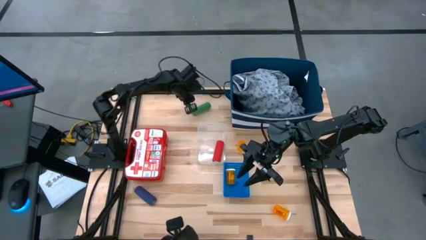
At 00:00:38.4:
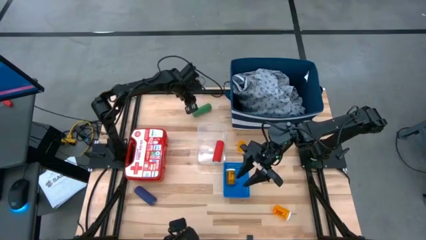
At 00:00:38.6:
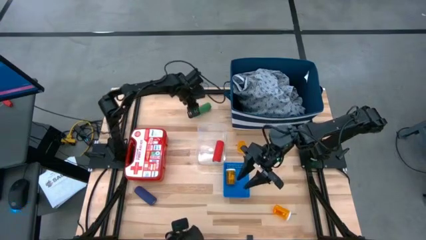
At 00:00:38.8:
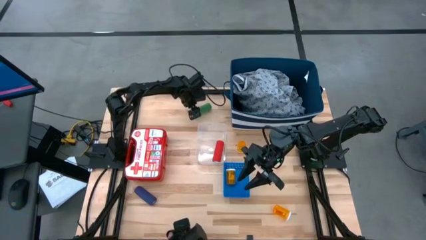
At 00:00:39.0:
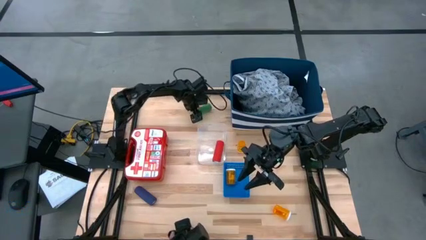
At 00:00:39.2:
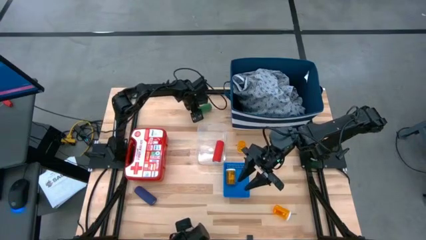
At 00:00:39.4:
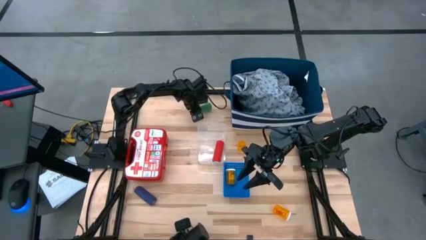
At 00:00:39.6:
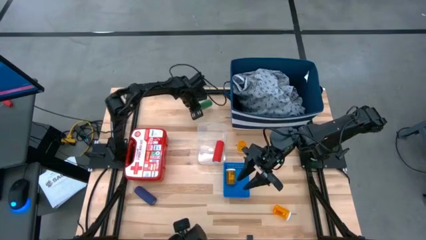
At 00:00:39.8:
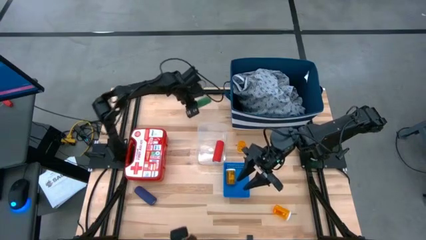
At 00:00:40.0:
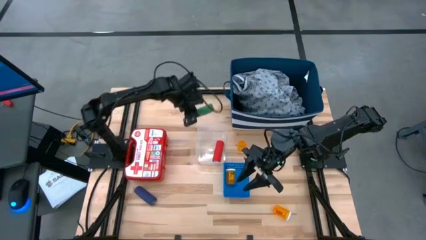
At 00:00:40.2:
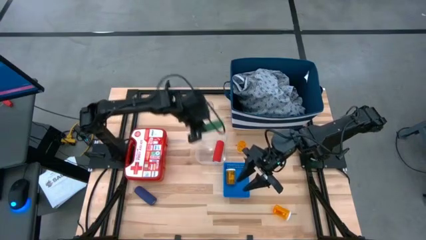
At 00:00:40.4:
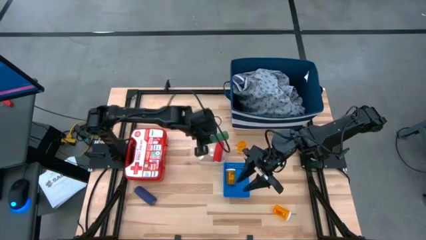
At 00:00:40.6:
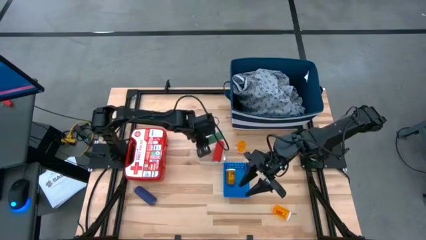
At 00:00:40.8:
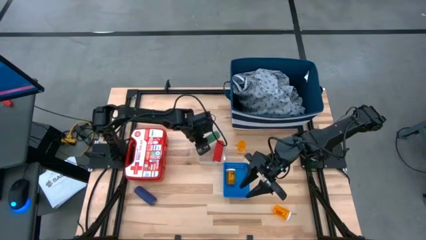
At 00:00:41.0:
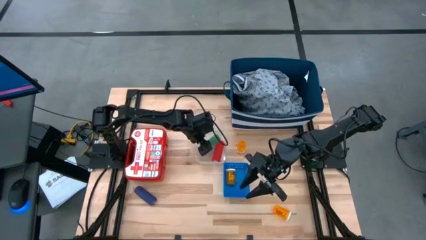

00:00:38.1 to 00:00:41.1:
Task: Pick & Place Medicine items
Put the green bandage into the white transparent bin

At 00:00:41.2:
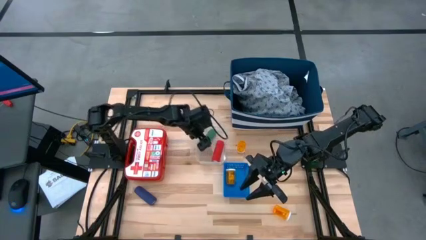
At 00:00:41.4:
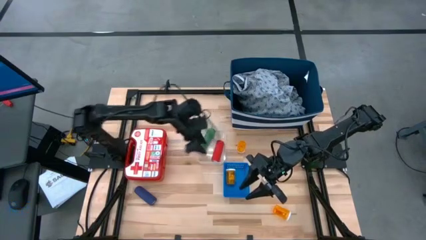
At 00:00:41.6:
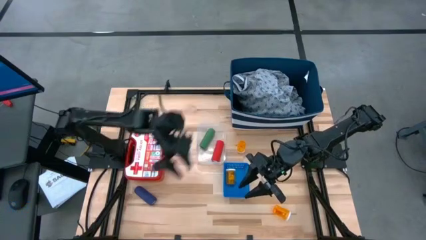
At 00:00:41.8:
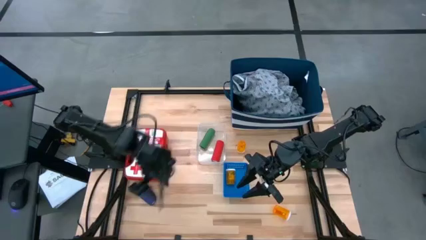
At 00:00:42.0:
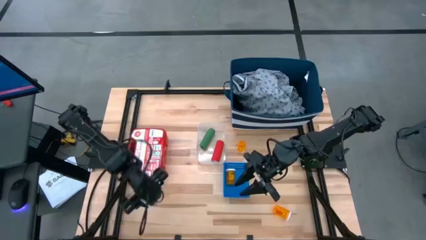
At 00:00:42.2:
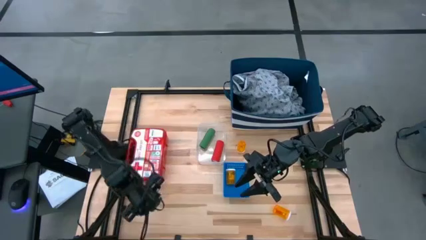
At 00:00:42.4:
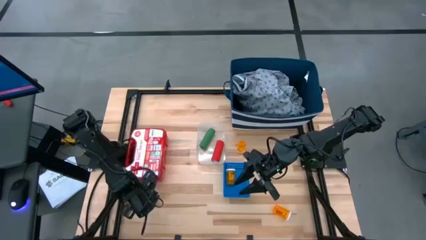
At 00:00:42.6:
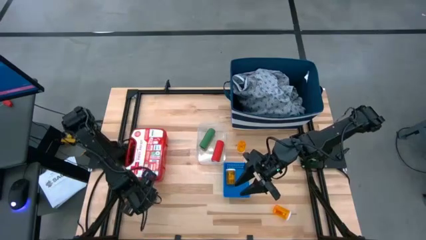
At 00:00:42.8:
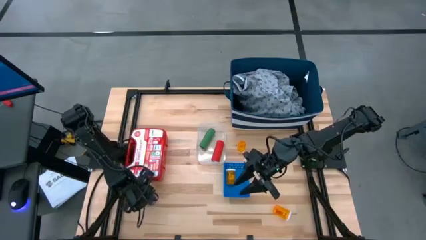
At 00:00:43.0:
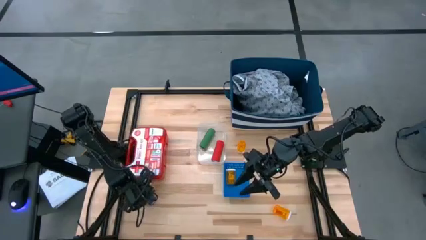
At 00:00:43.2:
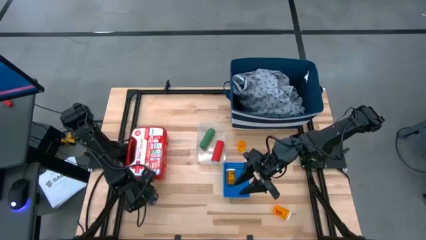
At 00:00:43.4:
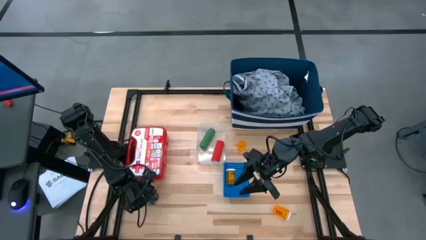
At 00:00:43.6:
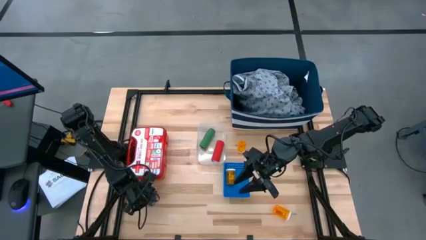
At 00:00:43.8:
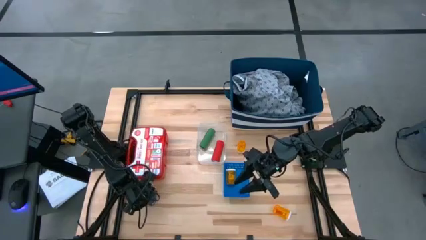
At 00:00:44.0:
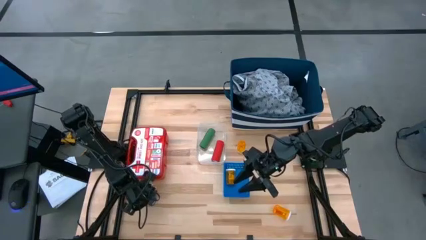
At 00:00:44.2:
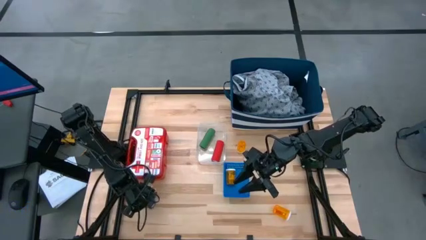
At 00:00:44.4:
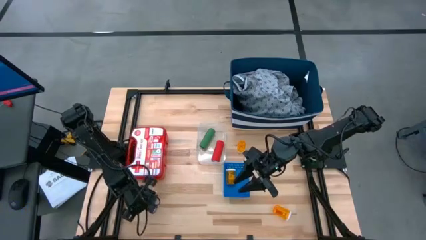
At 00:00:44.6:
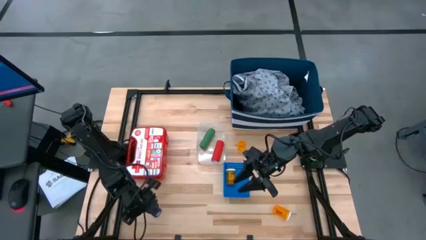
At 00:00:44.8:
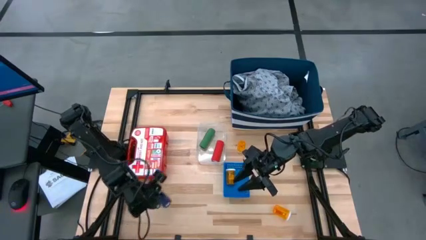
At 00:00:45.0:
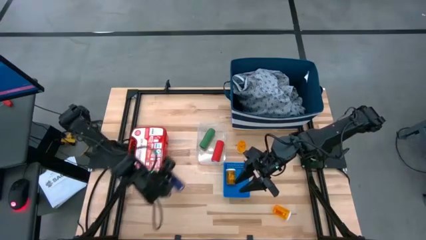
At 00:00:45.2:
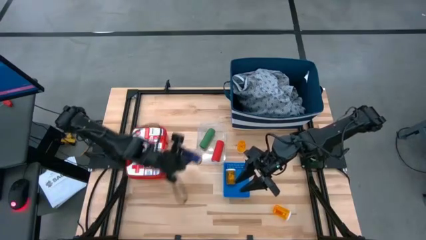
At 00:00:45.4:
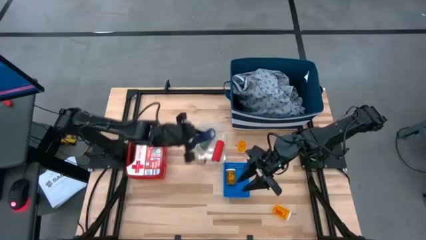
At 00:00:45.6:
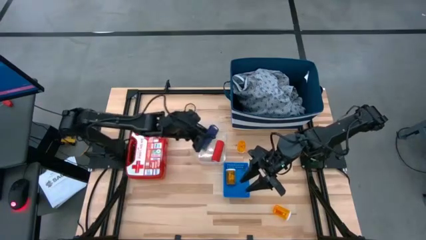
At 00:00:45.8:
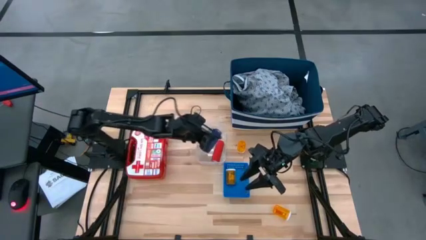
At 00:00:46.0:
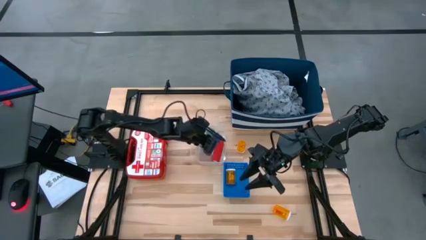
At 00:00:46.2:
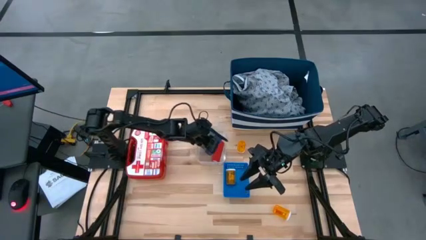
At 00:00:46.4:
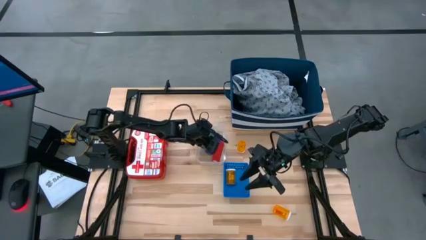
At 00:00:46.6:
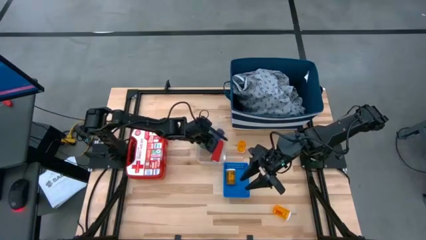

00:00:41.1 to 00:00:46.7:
Put the blue bandage into the white transparent bin

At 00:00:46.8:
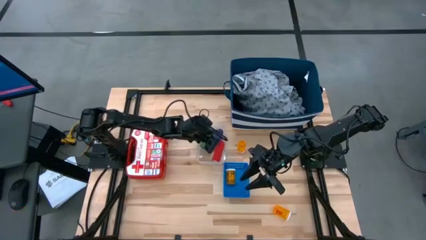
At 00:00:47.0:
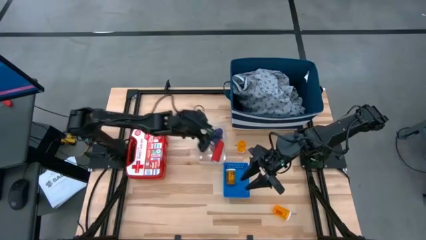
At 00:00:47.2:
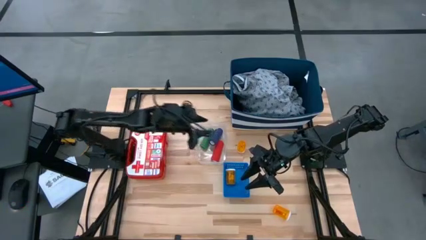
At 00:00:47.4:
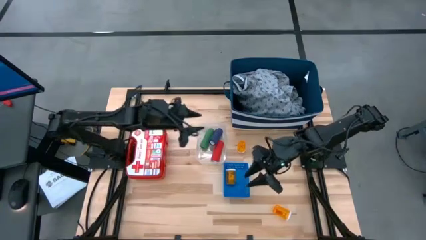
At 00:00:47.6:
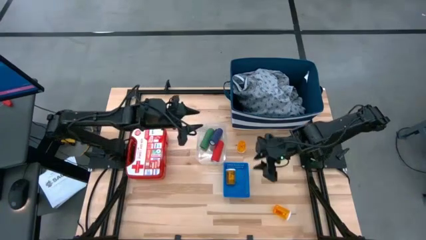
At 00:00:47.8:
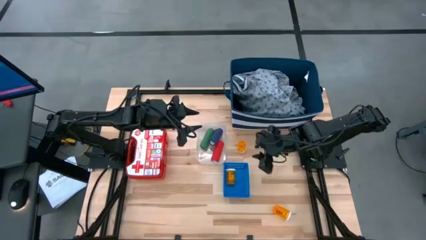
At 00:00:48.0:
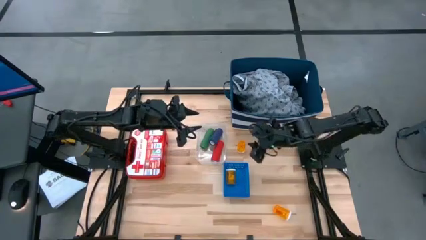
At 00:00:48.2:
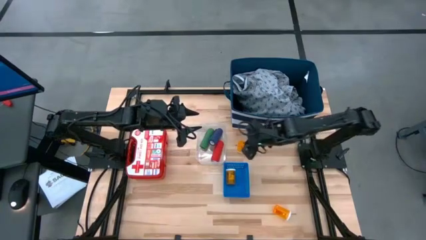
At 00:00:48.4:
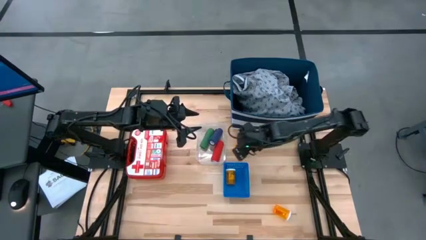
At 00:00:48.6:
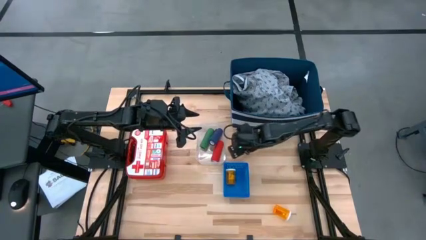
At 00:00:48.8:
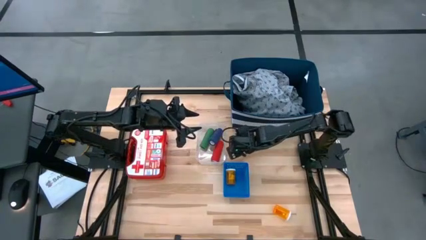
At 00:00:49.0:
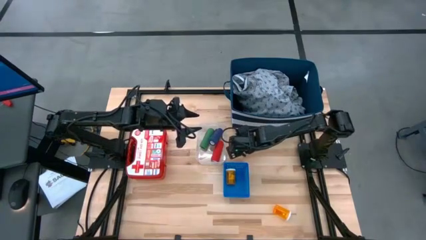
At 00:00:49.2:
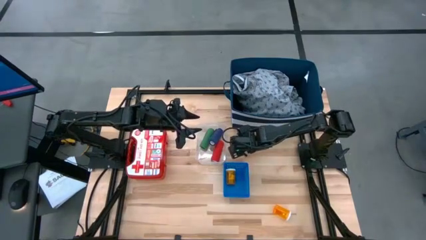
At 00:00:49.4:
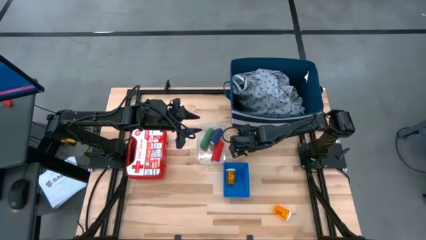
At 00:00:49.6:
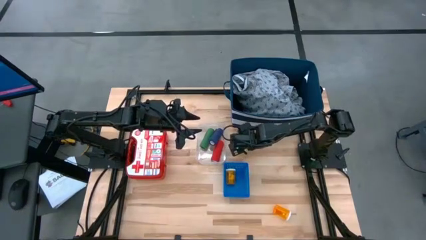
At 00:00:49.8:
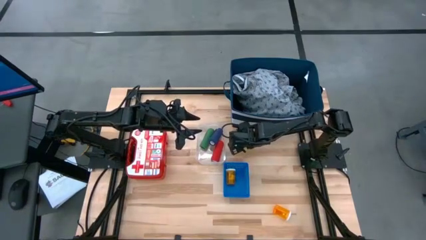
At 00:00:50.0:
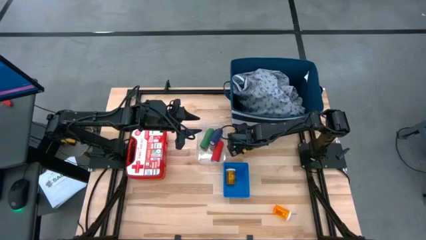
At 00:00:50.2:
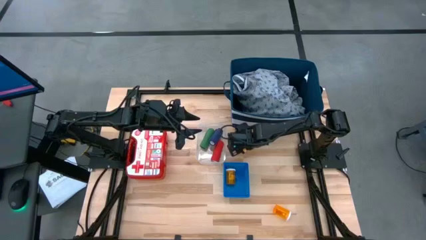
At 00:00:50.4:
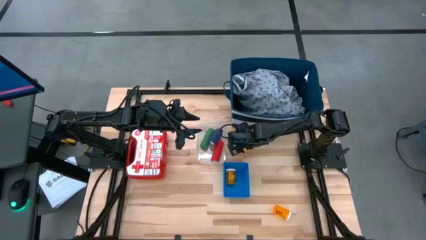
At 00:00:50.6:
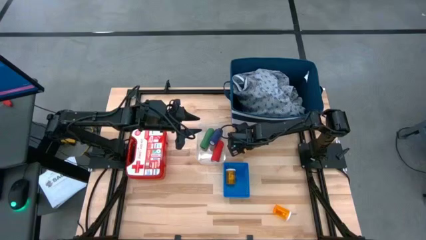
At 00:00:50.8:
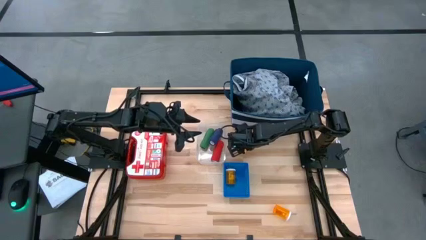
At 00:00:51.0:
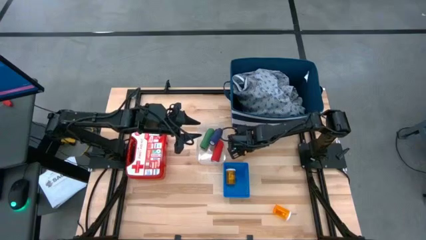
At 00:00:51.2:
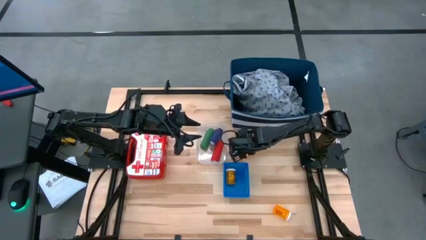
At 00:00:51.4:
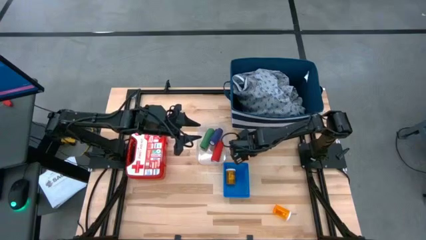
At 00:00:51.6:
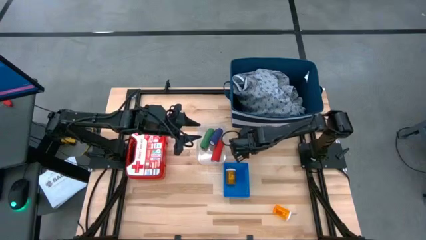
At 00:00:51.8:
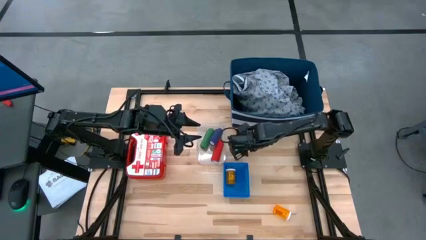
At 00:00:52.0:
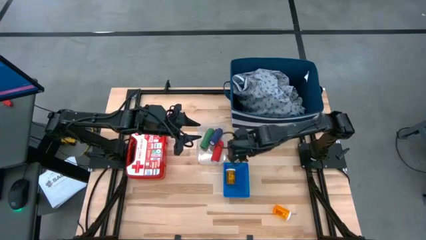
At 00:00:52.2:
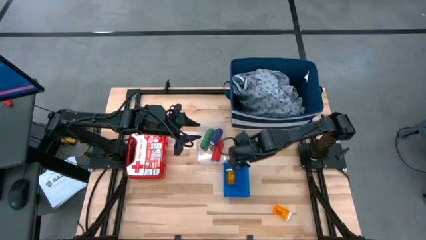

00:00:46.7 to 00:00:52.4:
Put the top orange pill bottle into the blue bin

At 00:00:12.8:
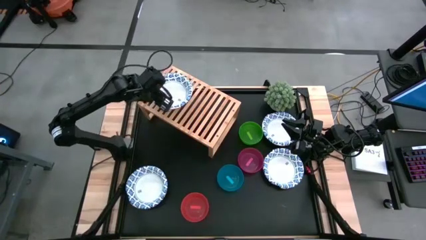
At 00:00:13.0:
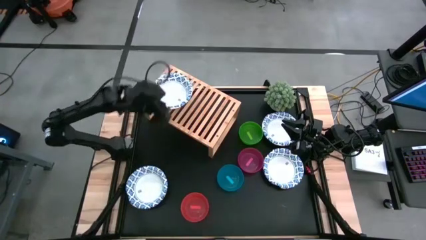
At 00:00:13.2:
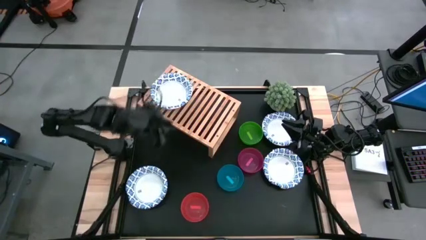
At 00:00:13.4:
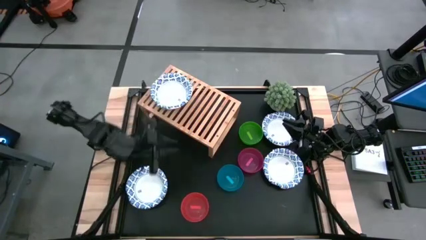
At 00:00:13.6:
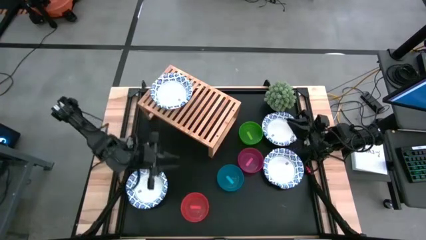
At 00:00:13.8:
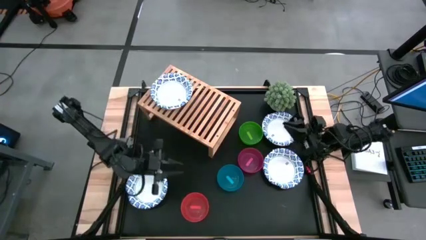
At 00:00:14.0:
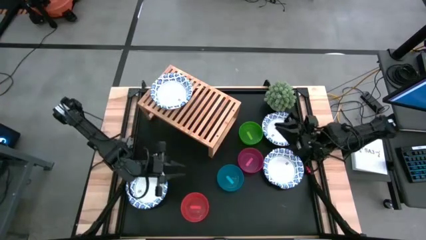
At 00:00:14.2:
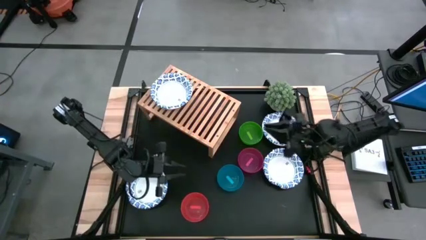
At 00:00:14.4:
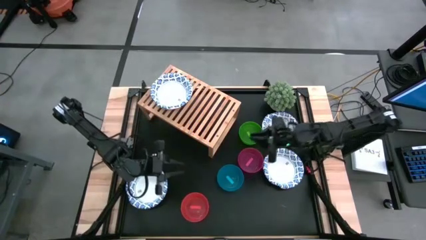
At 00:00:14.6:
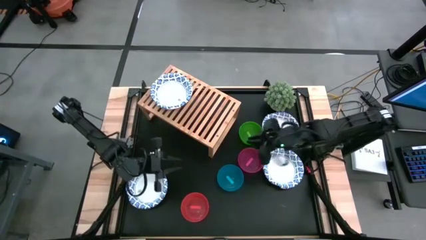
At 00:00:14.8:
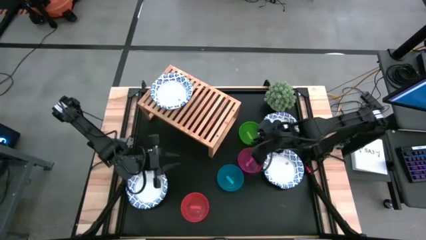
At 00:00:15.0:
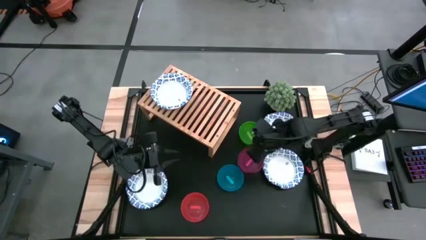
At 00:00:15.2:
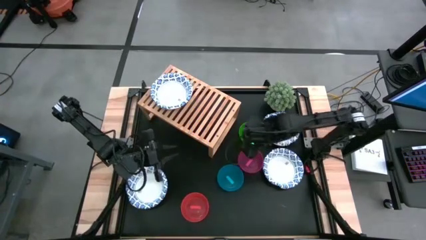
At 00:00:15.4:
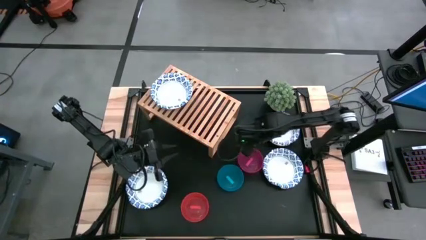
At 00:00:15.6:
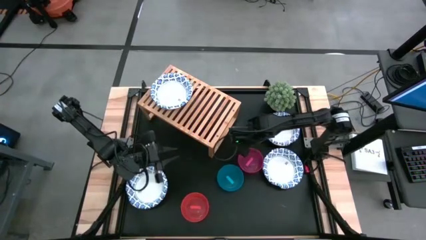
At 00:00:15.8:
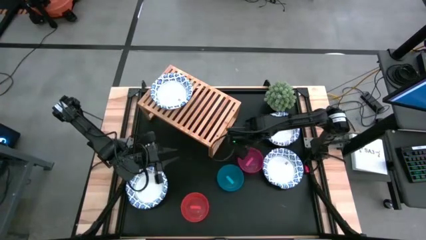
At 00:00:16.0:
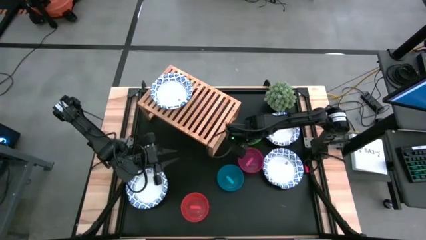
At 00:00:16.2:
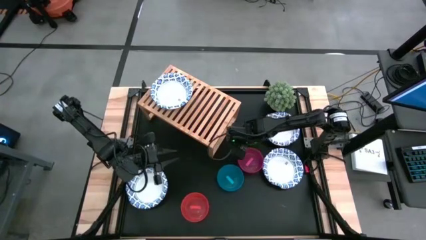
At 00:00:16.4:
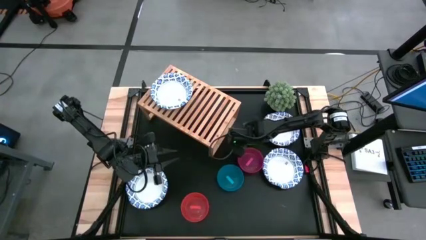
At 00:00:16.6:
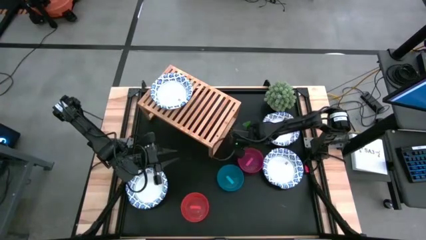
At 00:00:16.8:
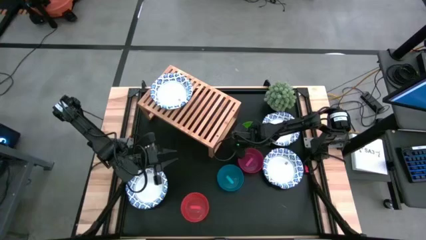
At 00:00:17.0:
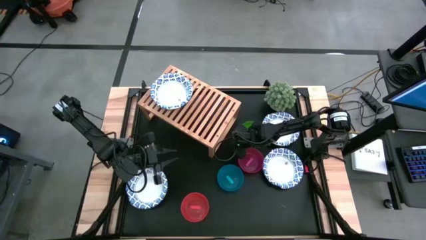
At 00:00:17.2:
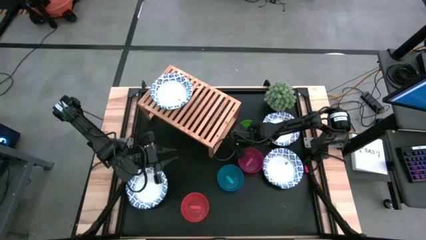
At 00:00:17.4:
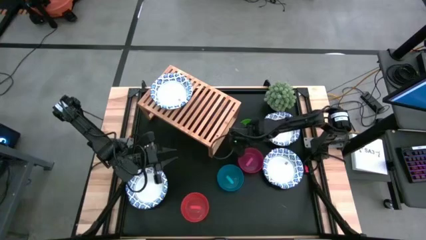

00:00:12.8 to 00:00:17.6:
Task: Place and stack bowls onto a shelf
Put the green bowl on the shelf
